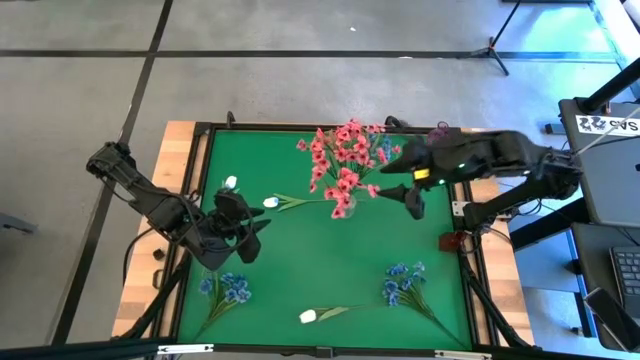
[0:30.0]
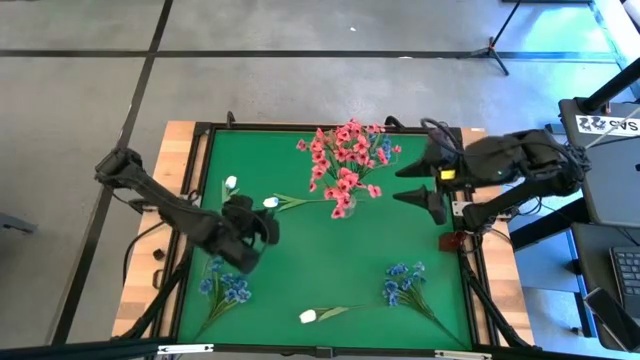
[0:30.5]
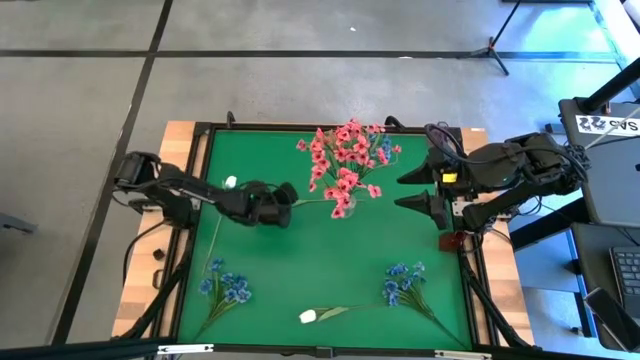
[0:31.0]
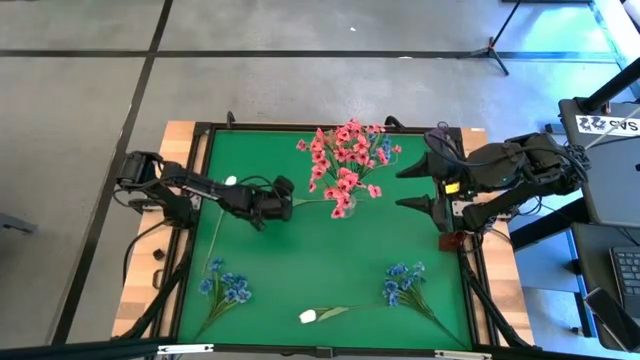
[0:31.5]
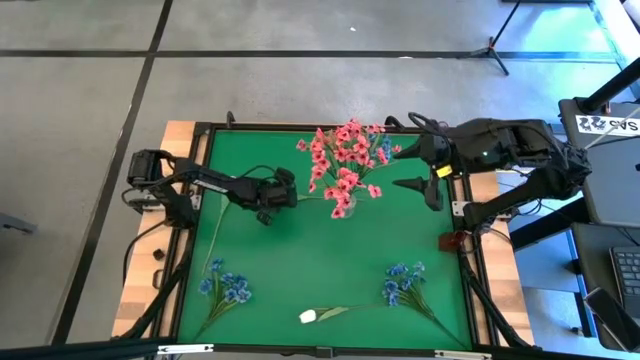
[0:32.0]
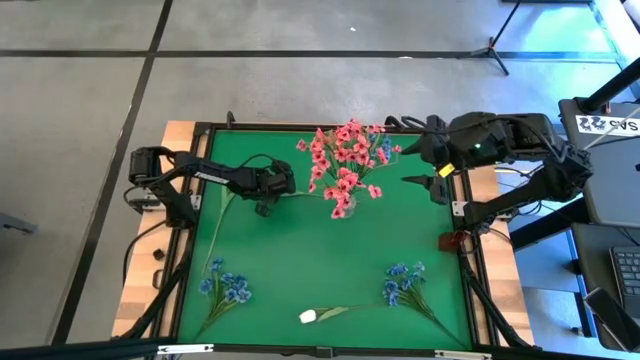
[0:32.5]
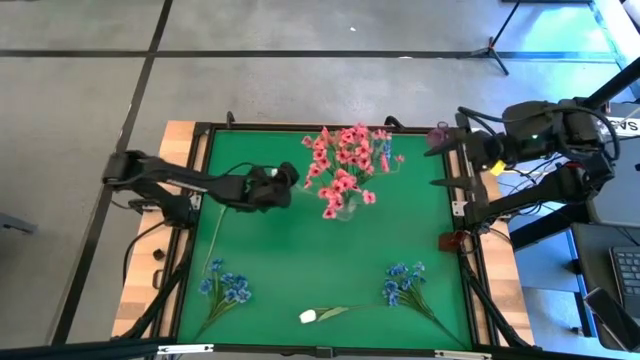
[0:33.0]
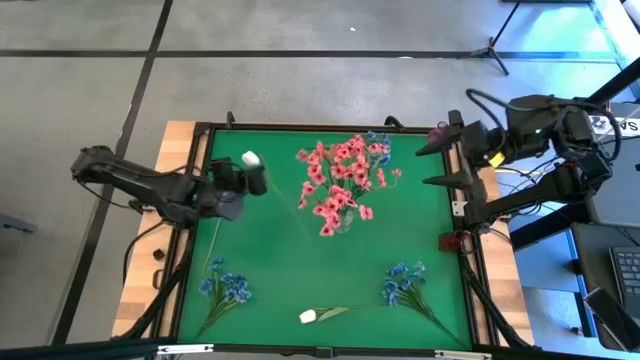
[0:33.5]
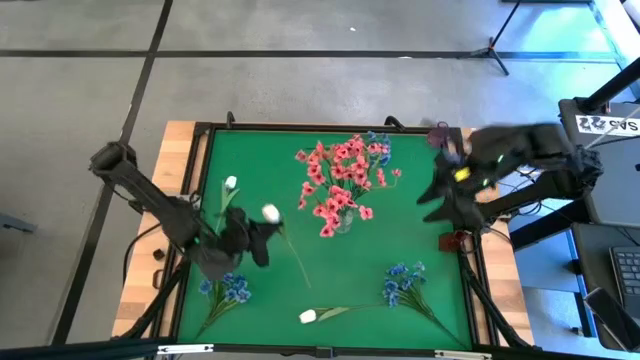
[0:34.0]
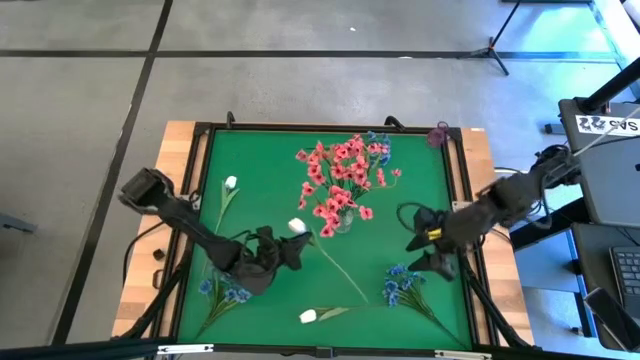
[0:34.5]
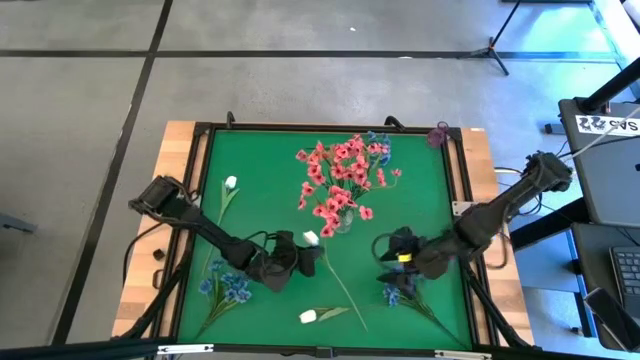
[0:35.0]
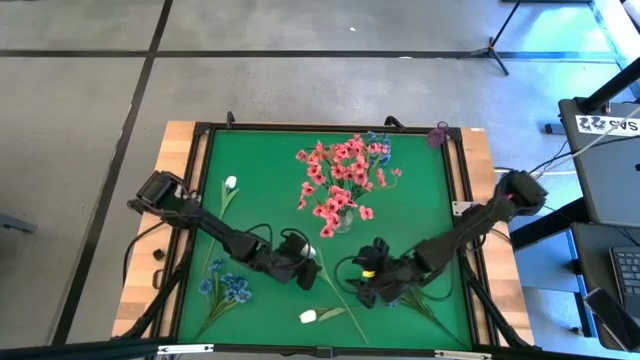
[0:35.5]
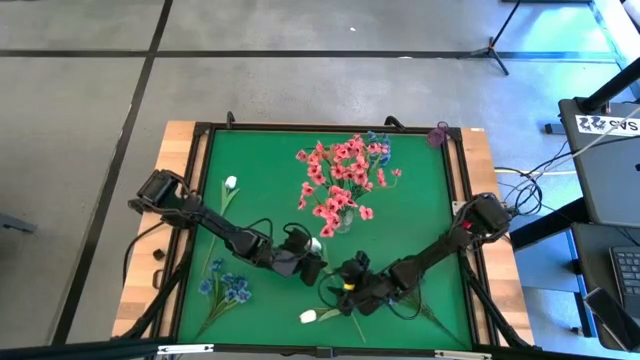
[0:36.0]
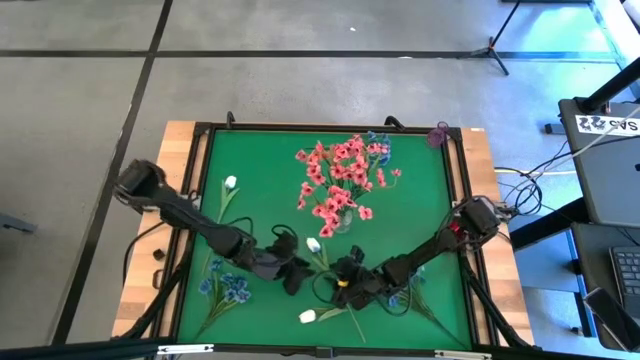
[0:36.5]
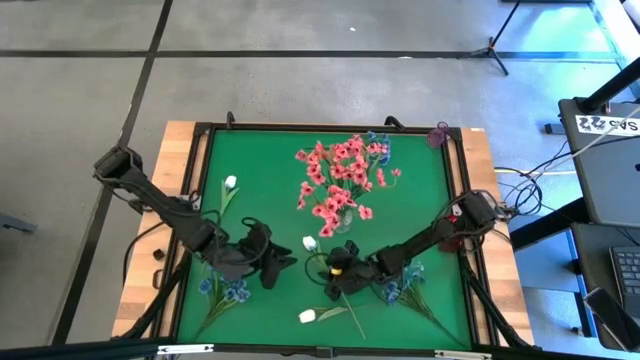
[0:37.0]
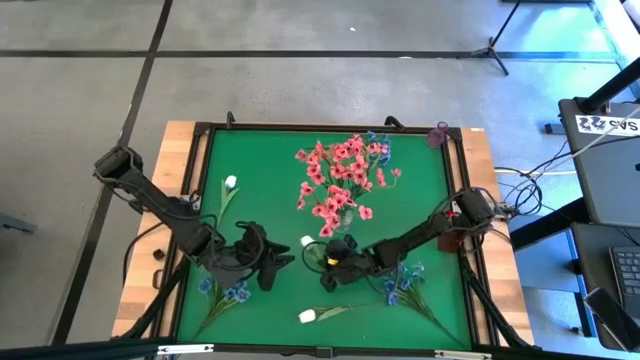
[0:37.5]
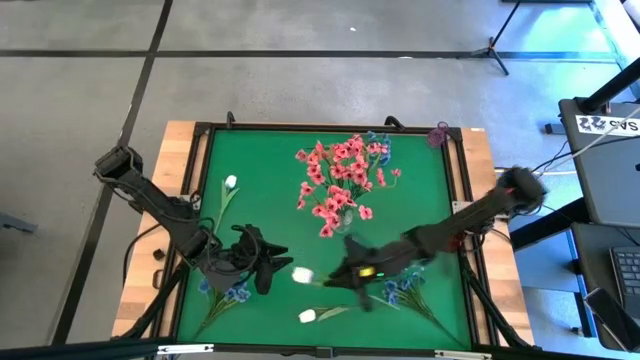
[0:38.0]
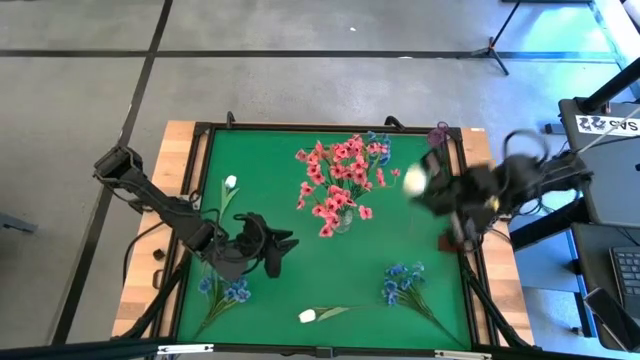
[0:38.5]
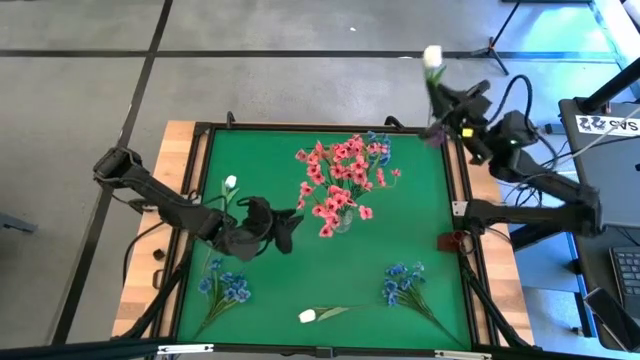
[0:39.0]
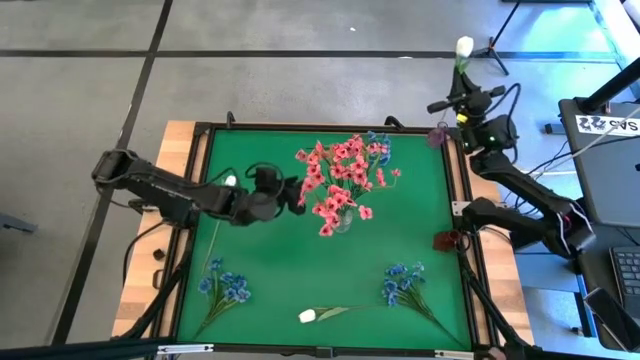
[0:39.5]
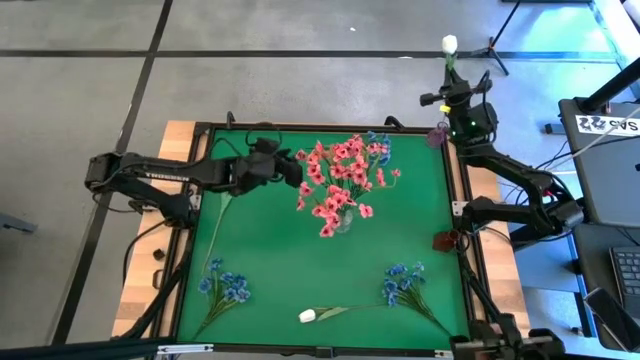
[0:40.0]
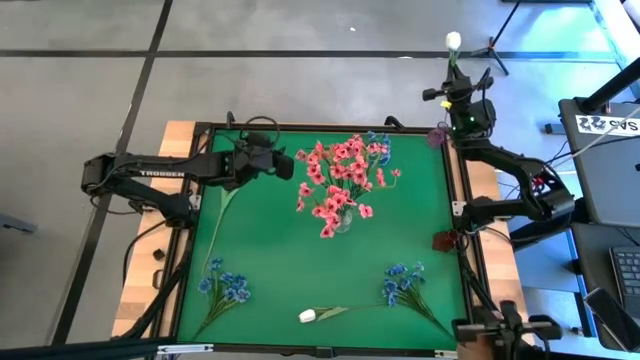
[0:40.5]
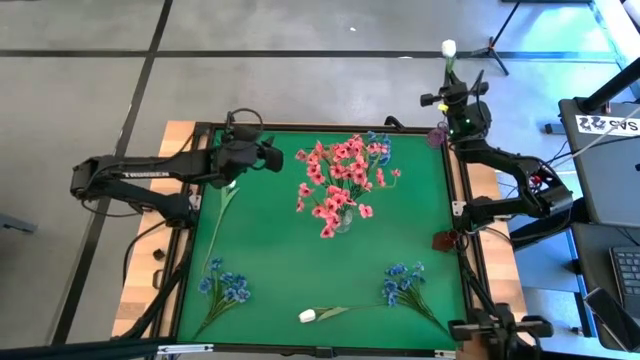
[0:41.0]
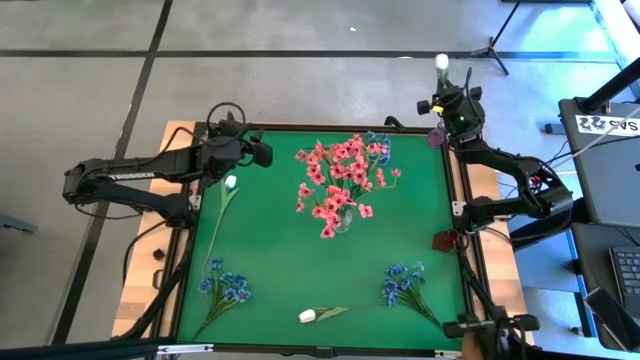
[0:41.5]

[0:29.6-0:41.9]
Task: Sort flowers into vase by color
Put the top right white flower into the purple vase

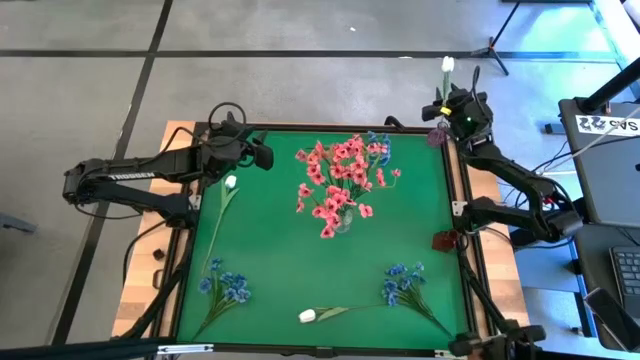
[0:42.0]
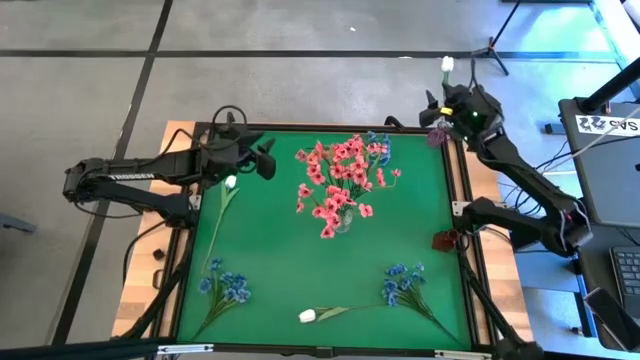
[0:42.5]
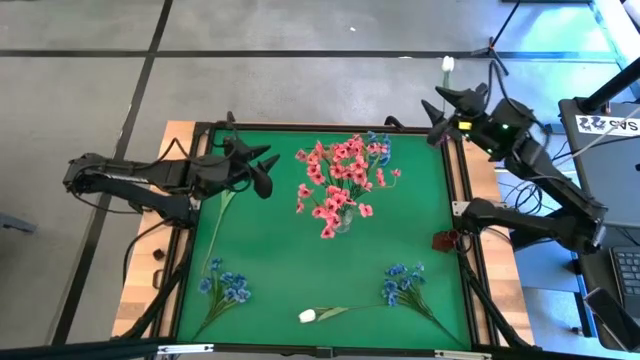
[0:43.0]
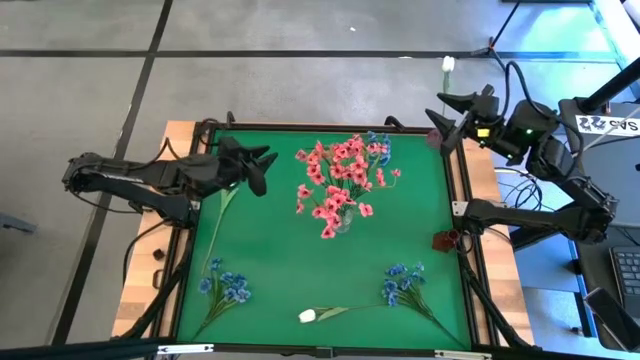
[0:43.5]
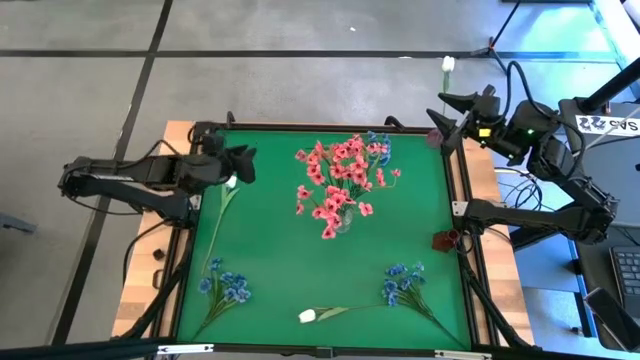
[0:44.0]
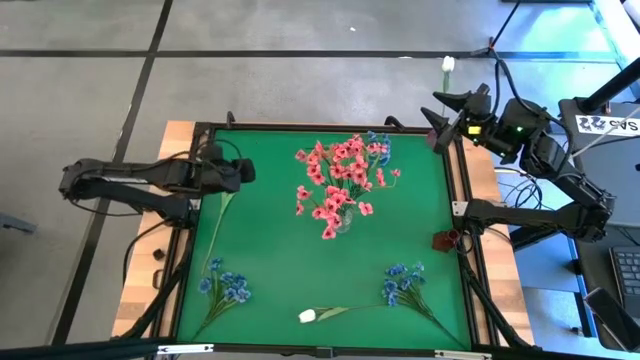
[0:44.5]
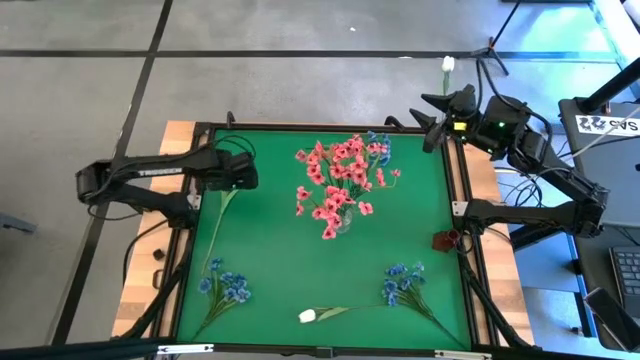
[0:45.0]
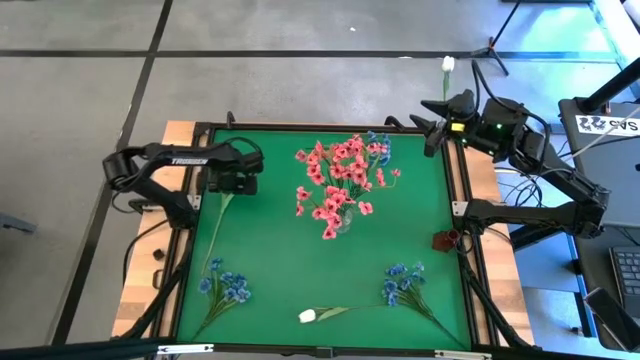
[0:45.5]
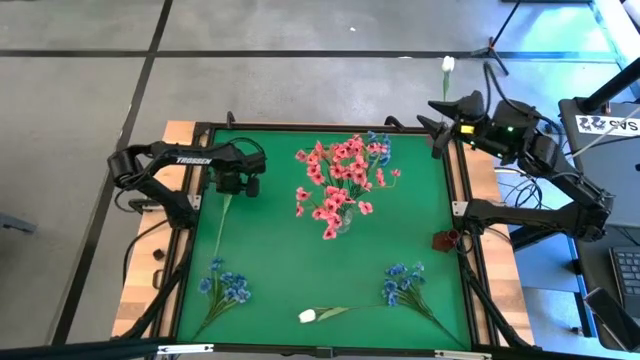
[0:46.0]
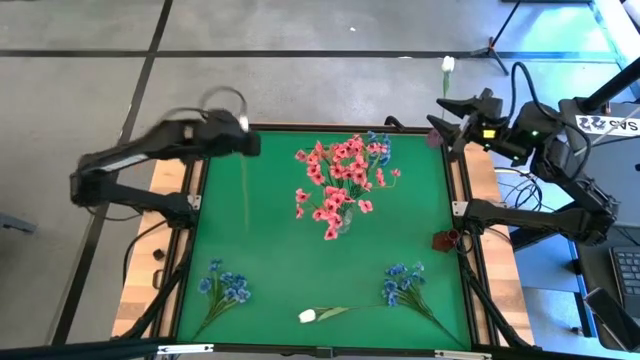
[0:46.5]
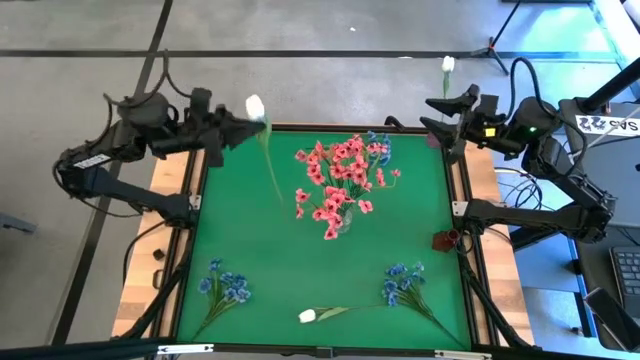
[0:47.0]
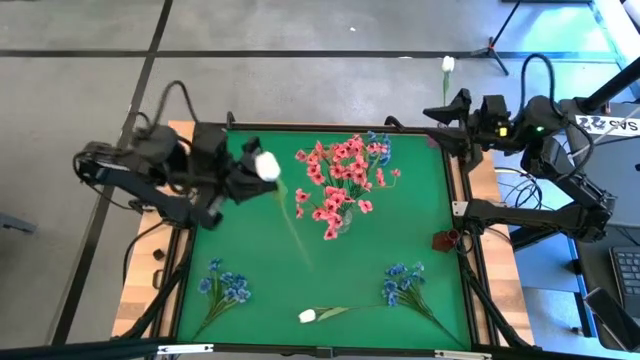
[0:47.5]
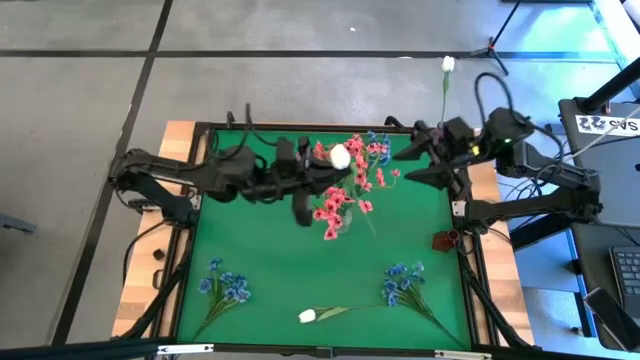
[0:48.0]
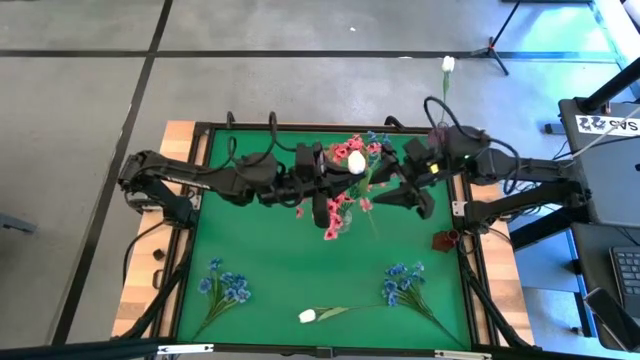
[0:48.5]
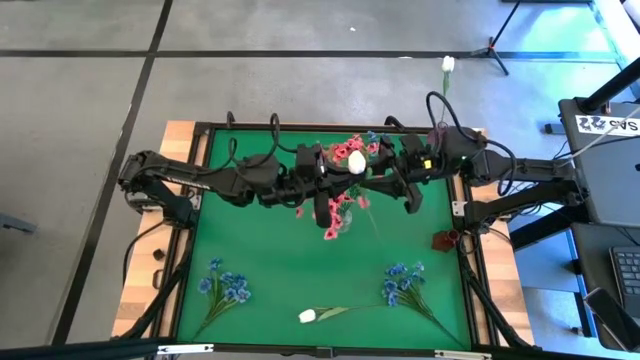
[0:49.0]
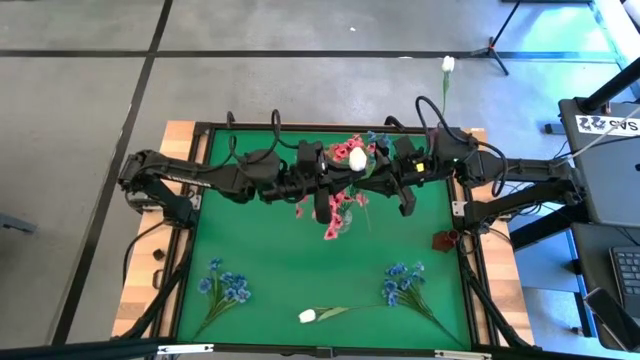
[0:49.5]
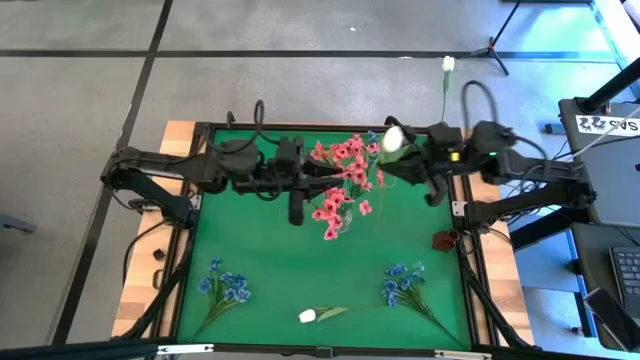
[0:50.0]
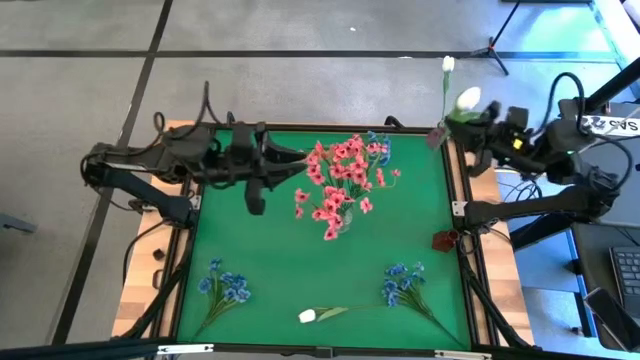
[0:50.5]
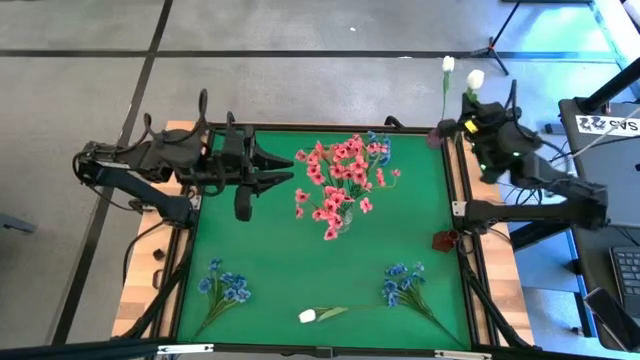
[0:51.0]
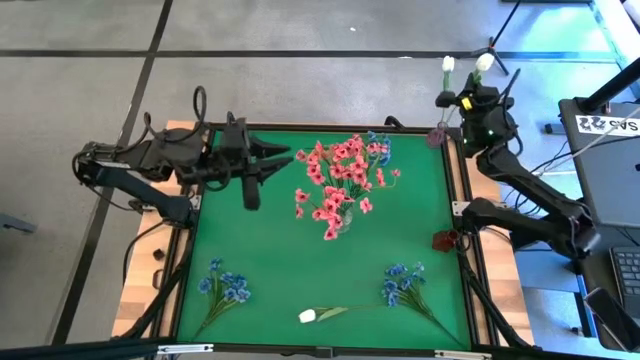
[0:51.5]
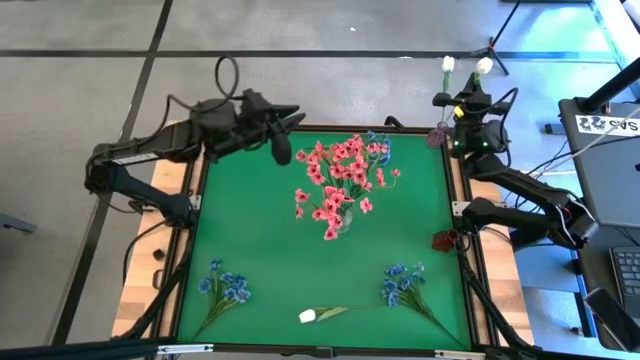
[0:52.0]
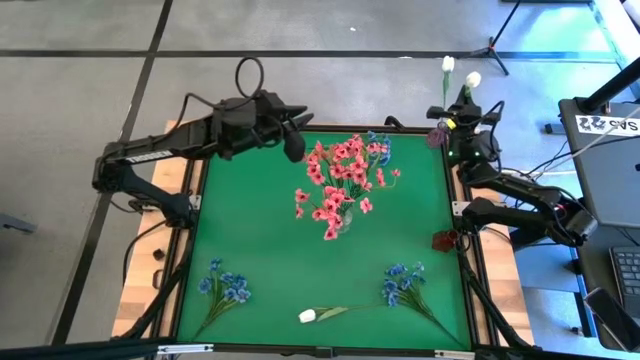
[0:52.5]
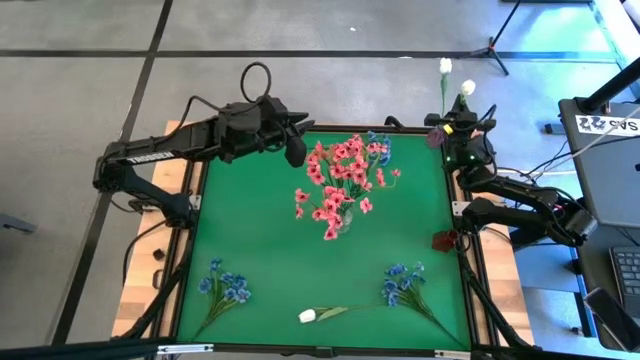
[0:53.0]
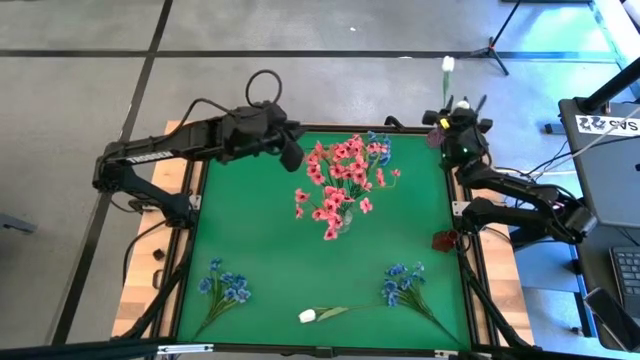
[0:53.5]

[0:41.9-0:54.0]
Put the top white flower into the purple vase
